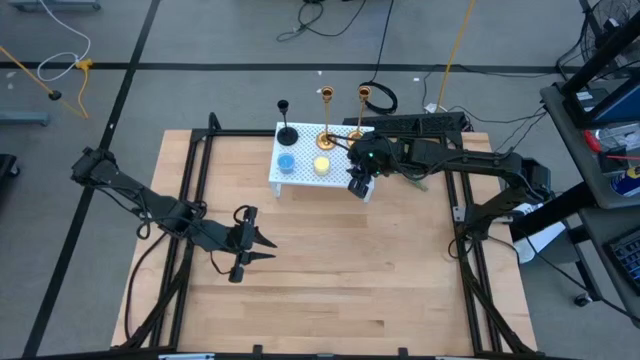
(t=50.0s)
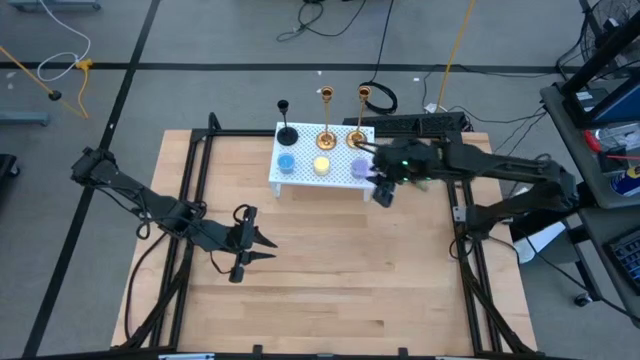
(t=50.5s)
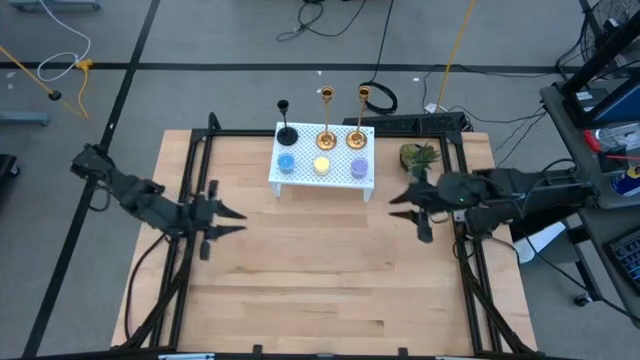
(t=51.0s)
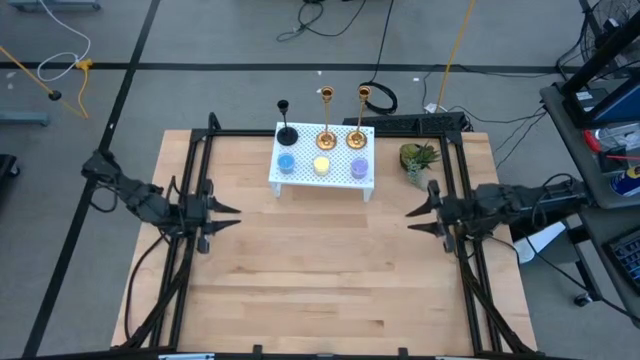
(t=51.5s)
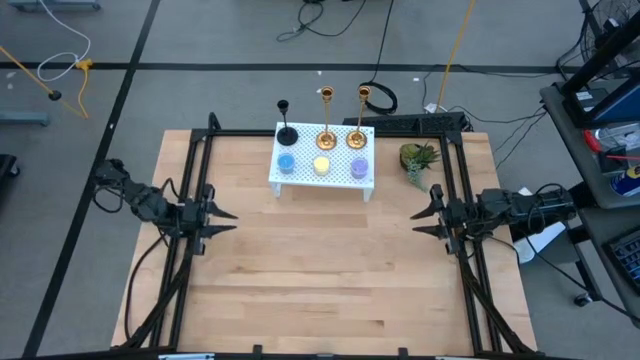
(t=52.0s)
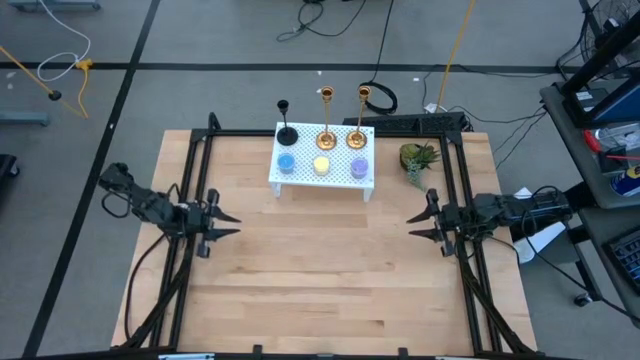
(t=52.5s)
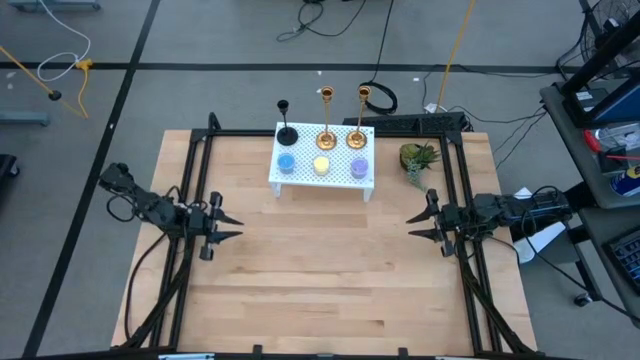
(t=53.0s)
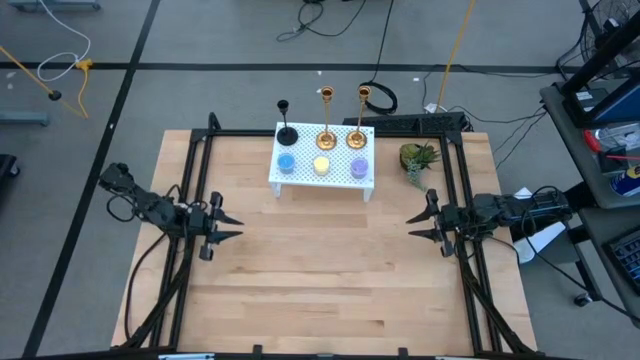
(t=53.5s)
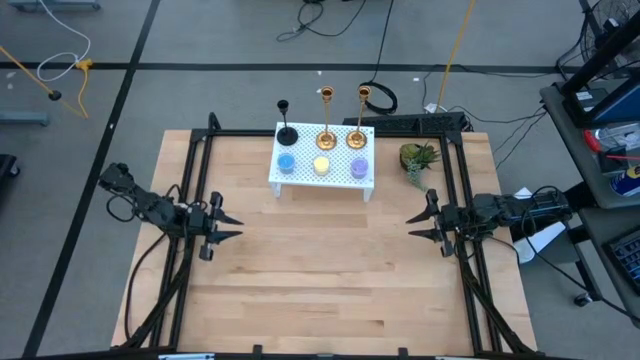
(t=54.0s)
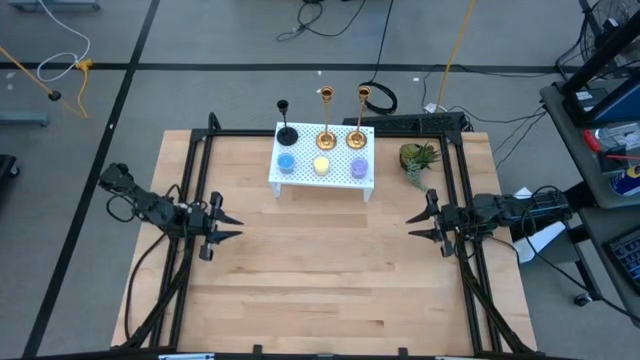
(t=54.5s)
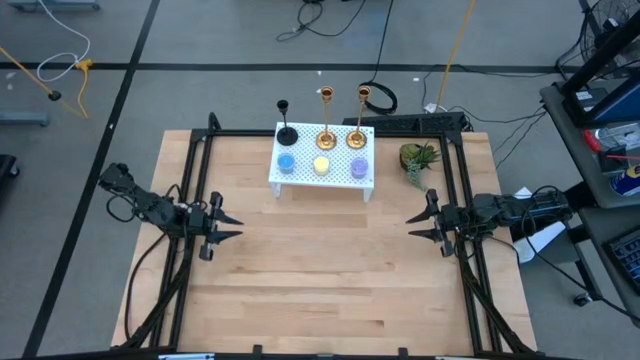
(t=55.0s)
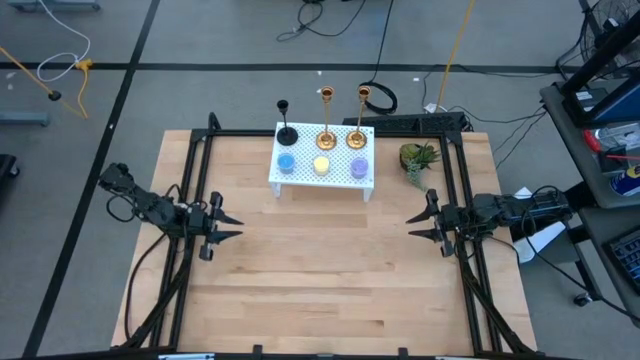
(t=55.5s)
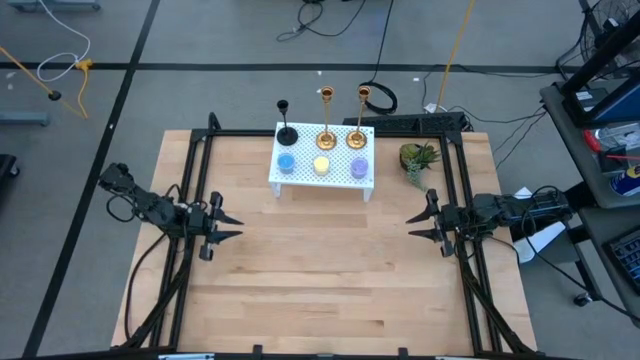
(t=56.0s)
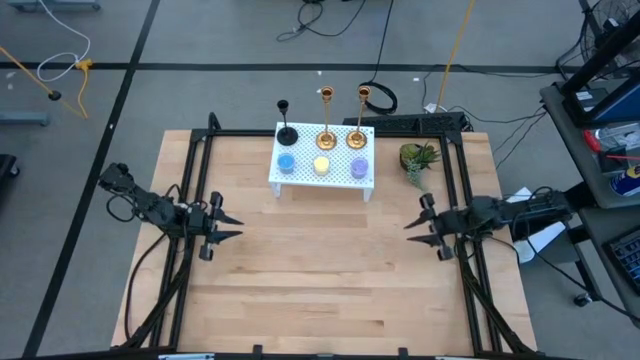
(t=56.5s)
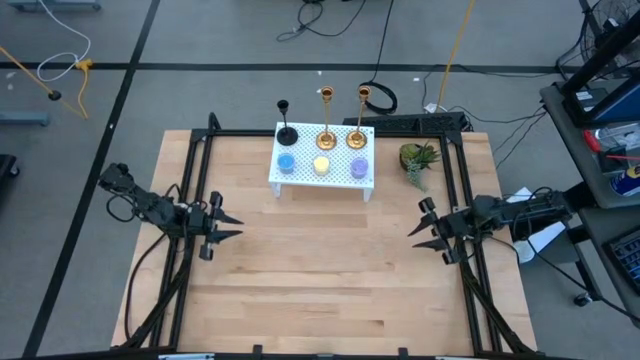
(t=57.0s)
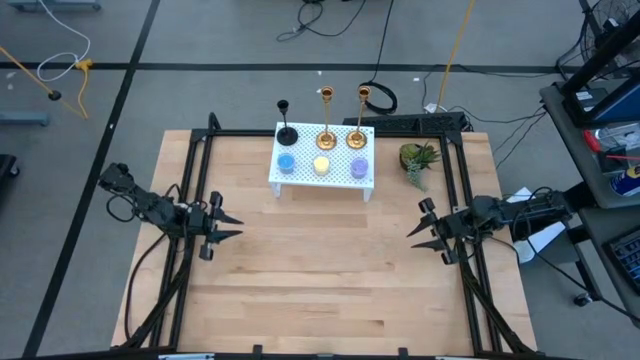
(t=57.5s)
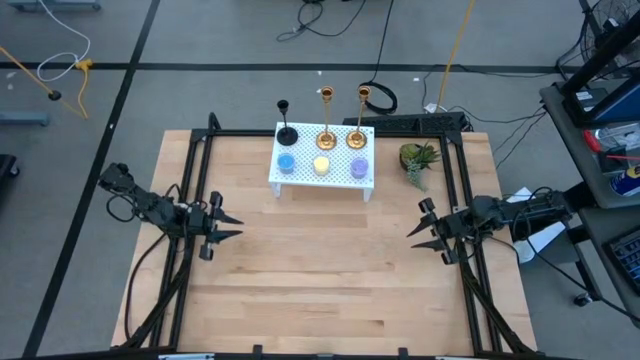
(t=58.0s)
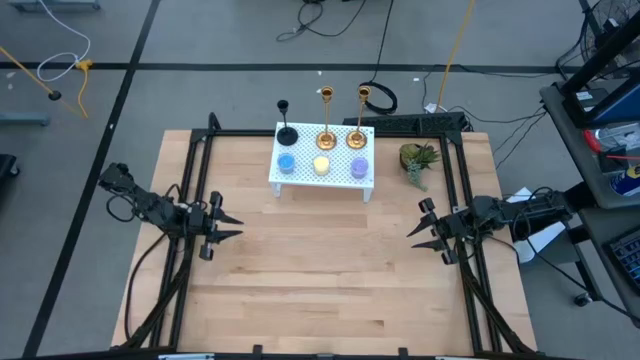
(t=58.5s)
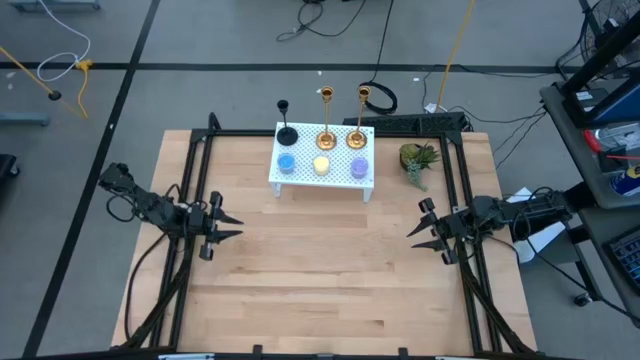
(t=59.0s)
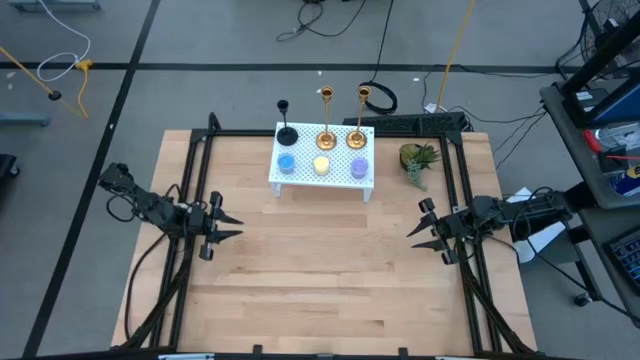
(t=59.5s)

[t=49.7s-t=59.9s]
Task: Pick & Place candle stick holders
Return to Home Position

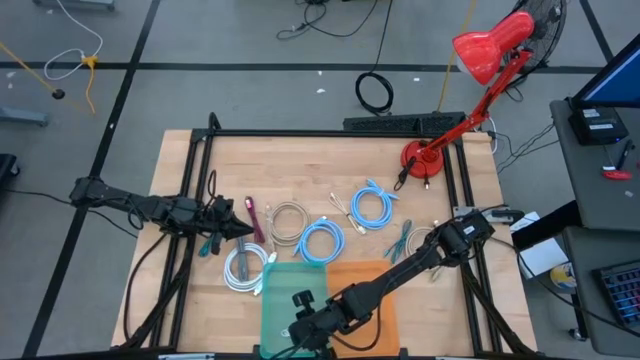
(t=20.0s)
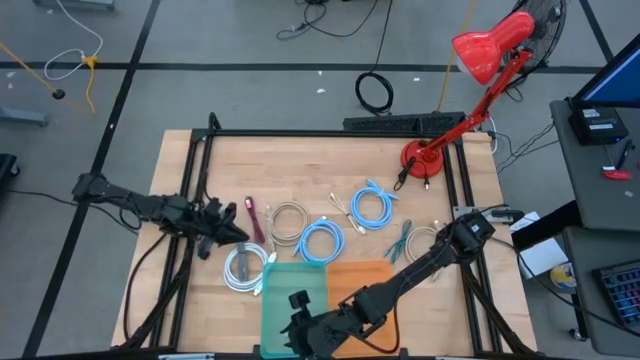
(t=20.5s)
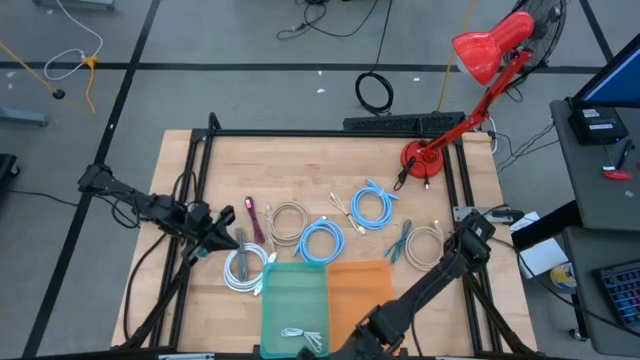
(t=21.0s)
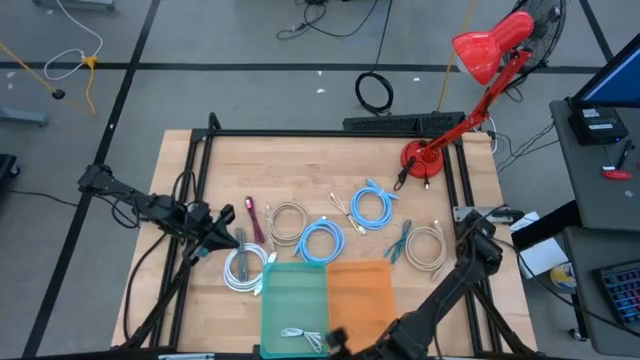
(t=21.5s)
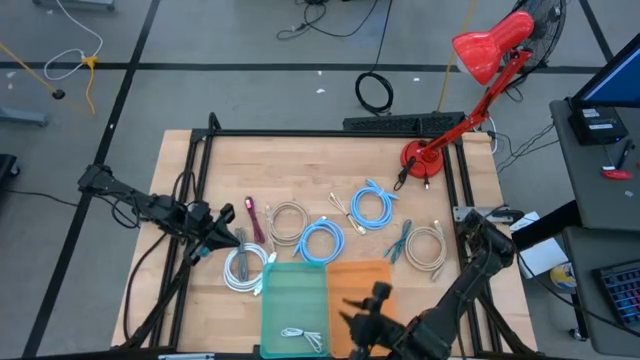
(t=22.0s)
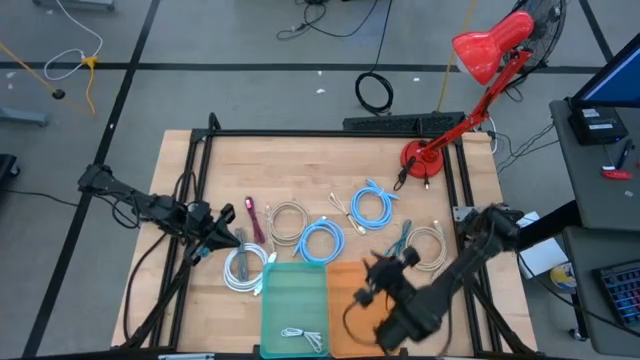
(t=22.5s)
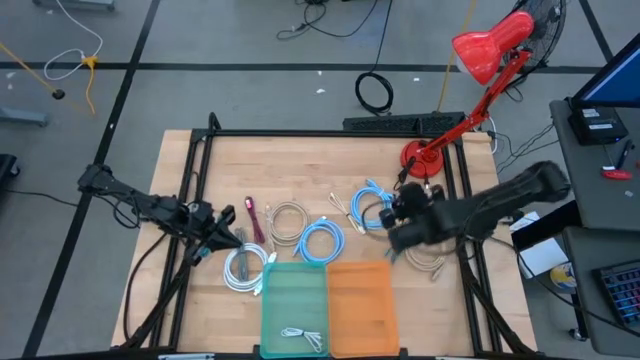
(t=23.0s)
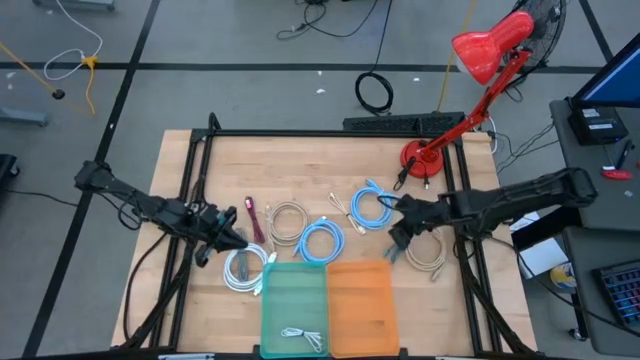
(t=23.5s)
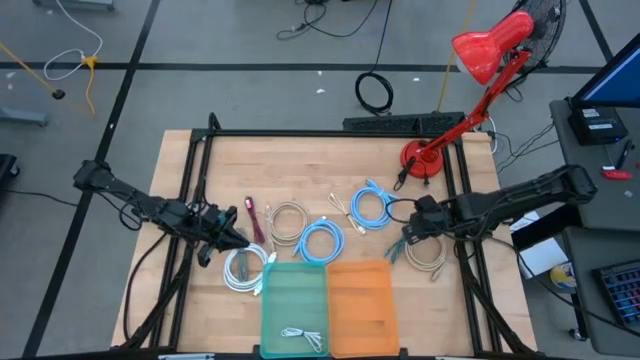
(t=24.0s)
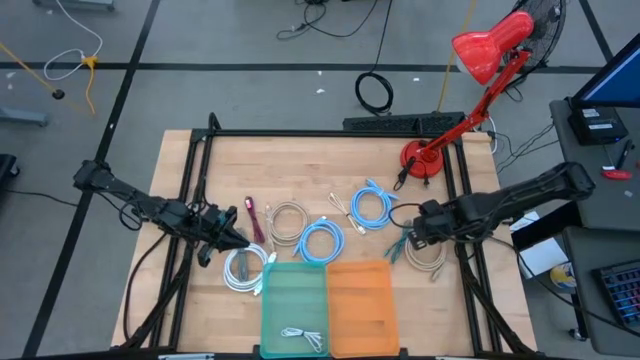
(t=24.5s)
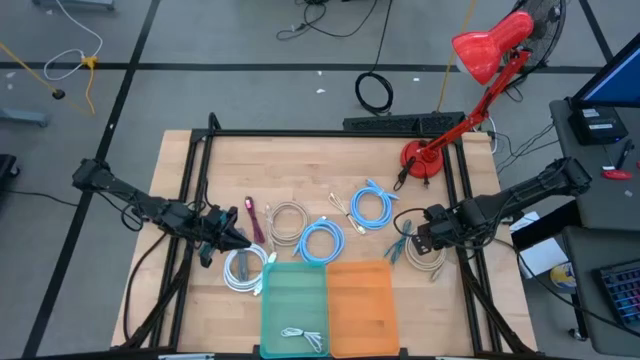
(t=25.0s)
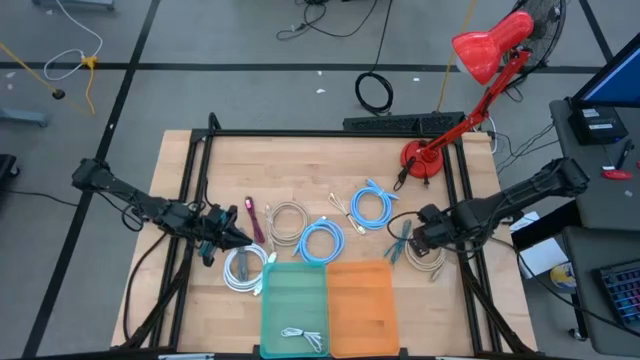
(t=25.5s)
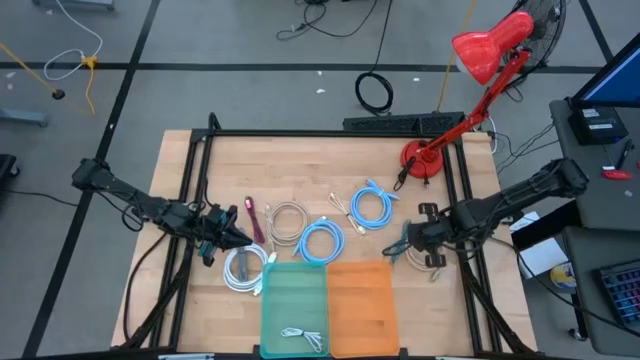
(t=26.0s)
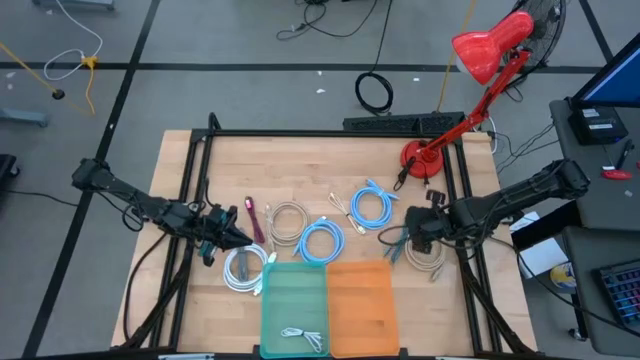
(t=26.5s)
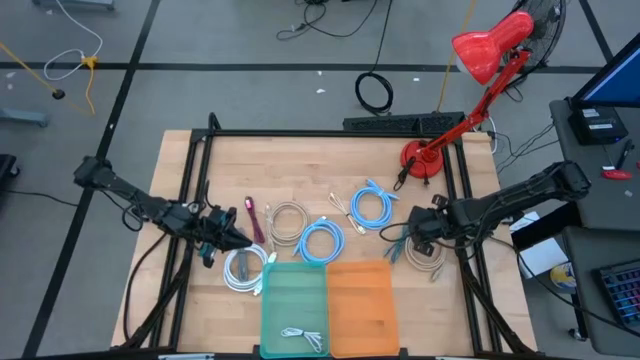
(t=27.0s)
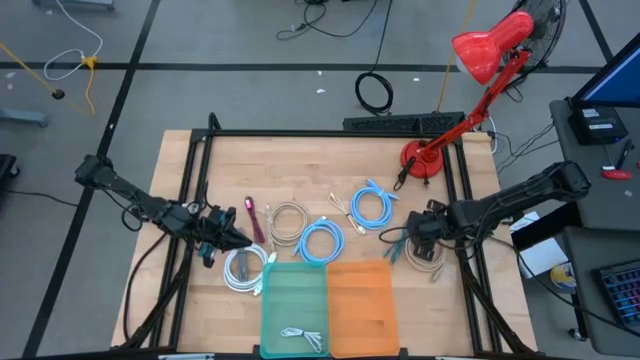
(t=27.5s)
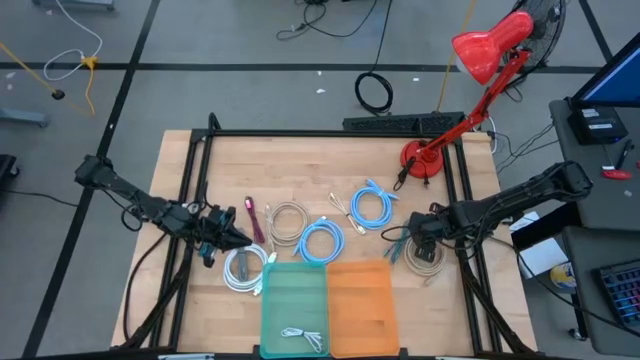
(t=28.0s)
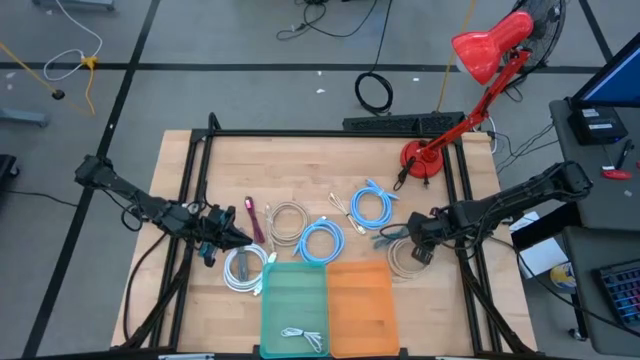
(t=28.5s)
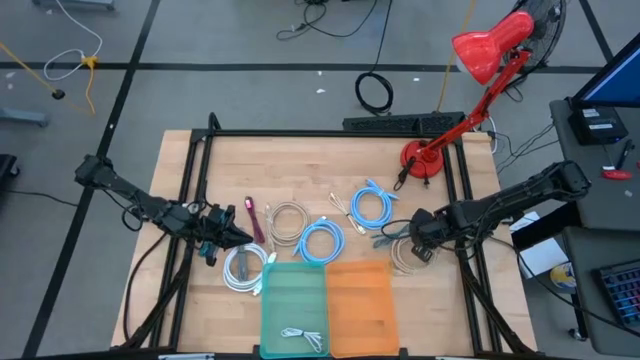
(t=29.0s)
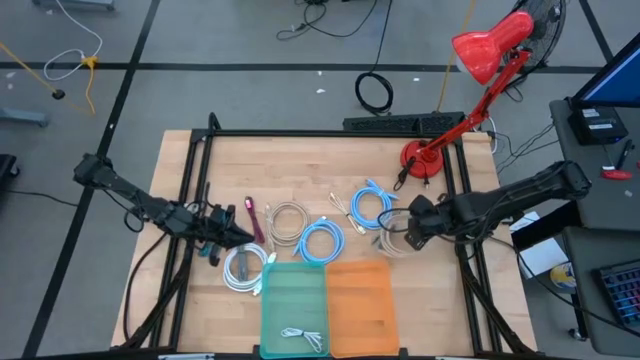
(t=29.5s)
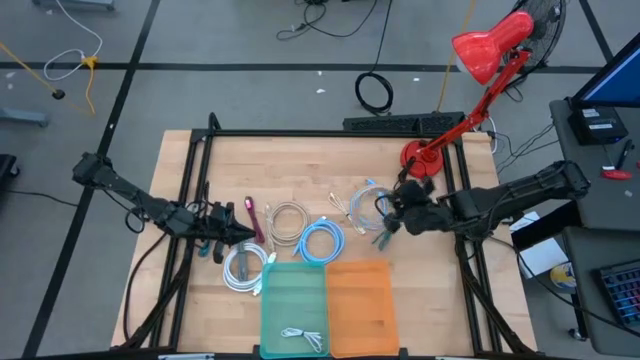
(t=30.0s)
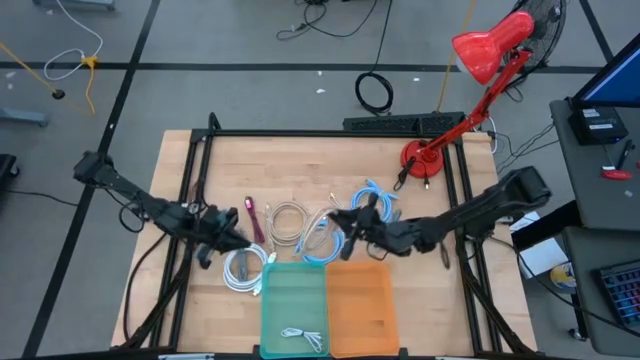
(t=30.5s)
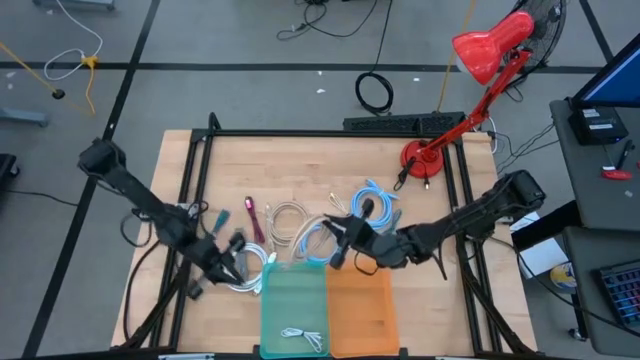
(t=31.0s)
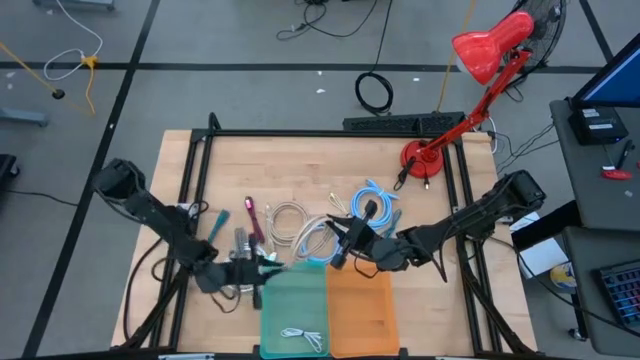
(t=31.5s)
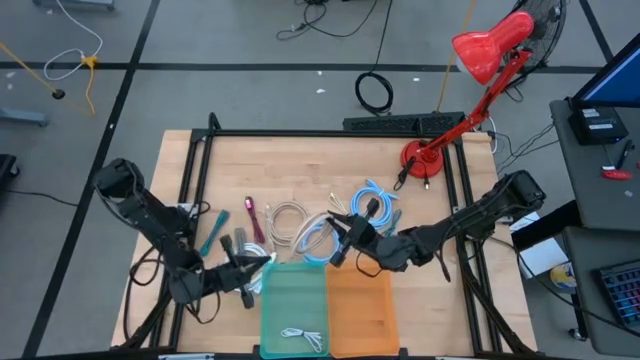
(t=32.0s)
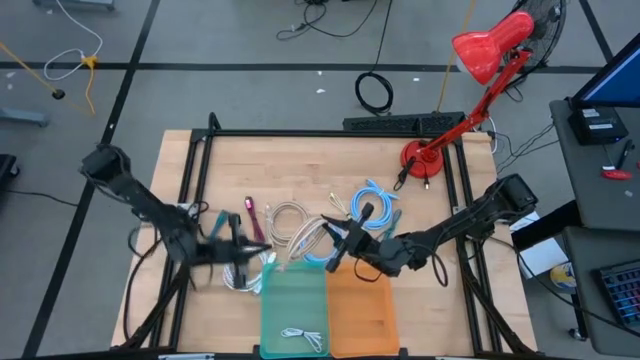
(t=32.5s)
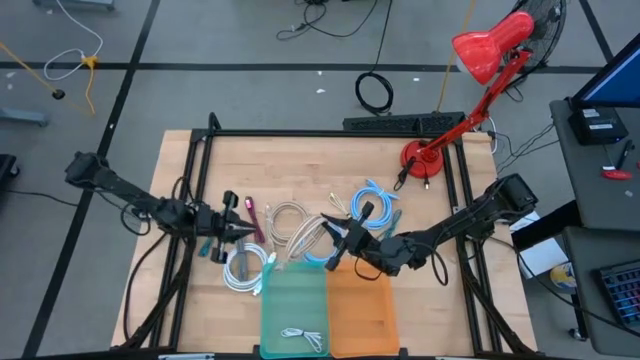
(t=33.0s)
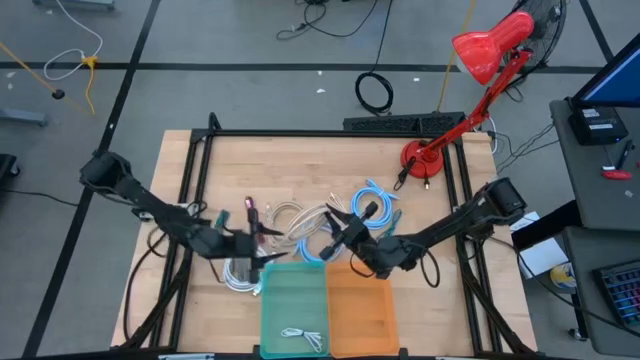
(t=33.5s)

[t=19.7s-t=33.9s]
Task: Pick & Place USB Port
Put the right gray video cable into the orange bin
